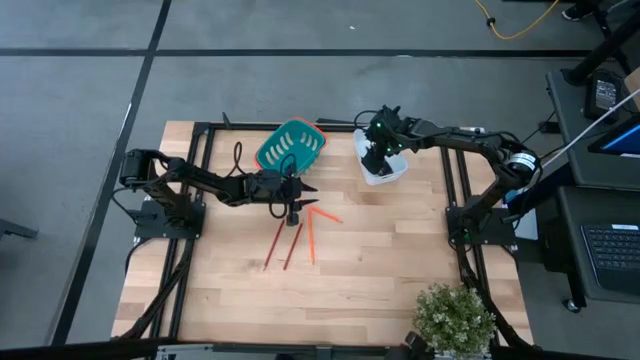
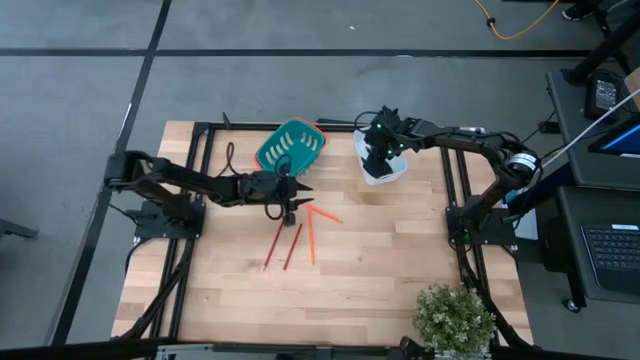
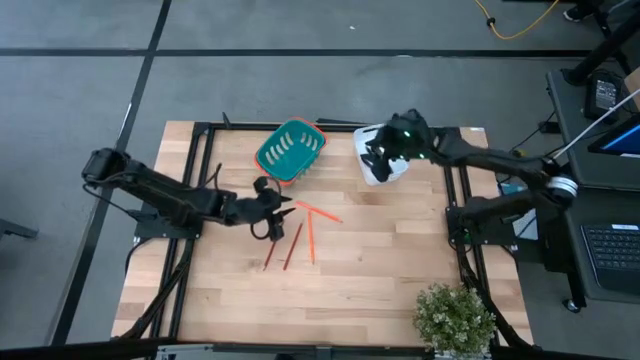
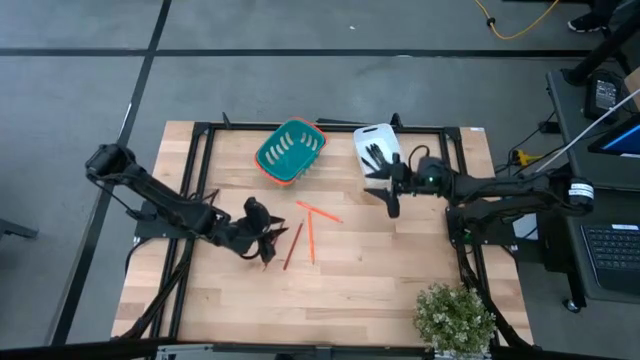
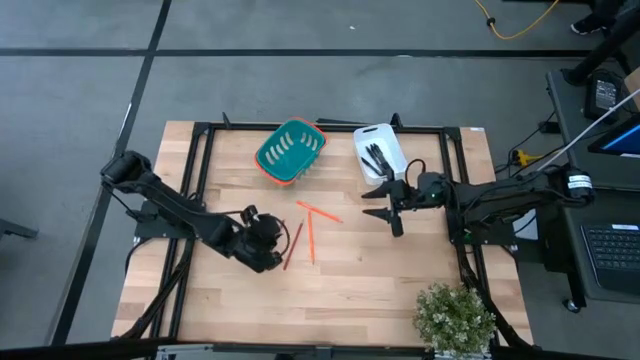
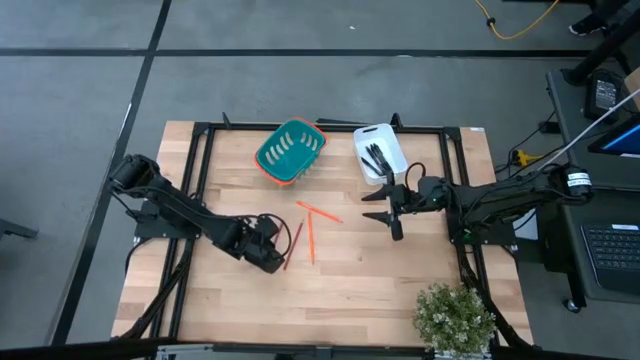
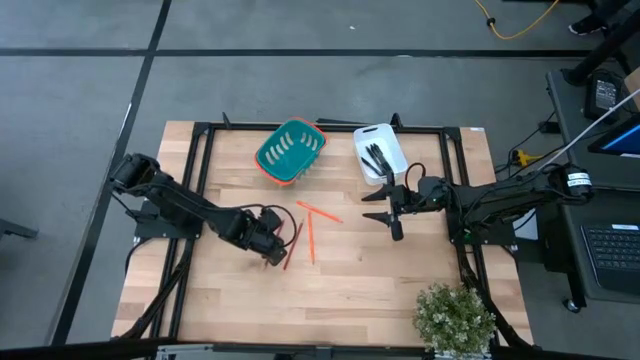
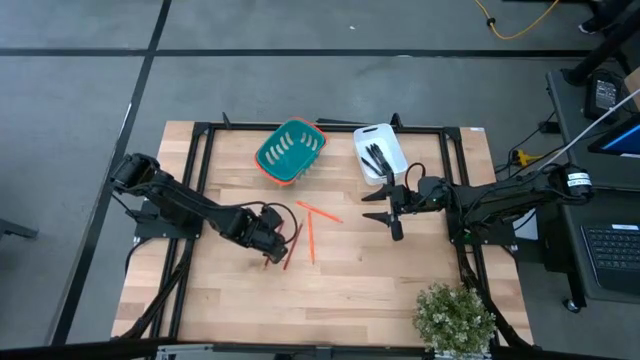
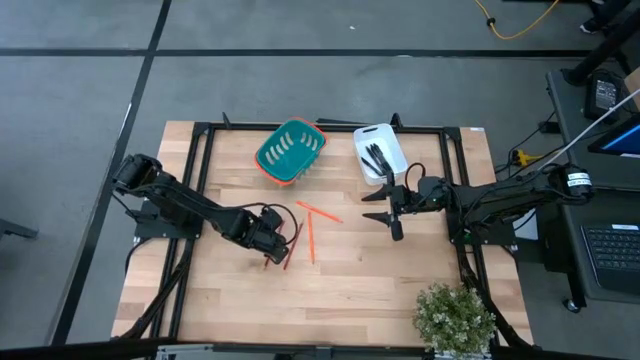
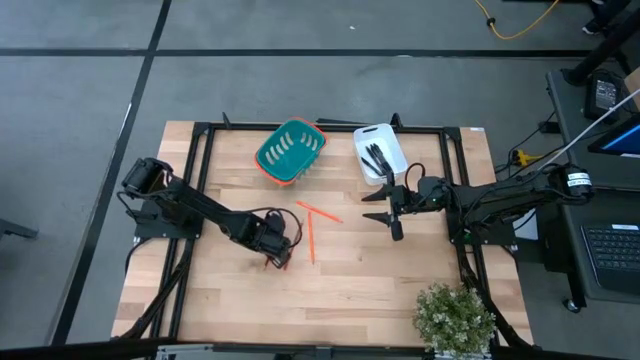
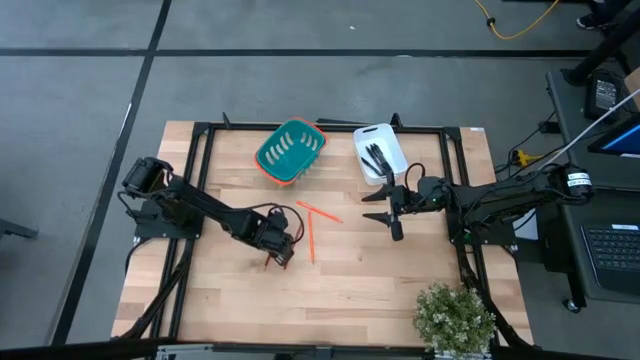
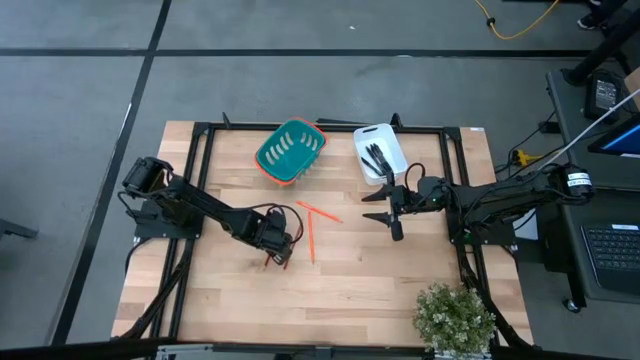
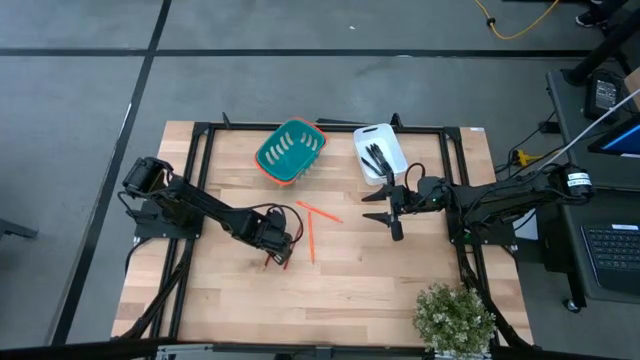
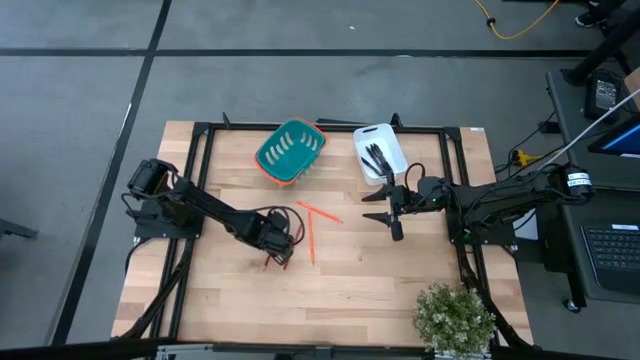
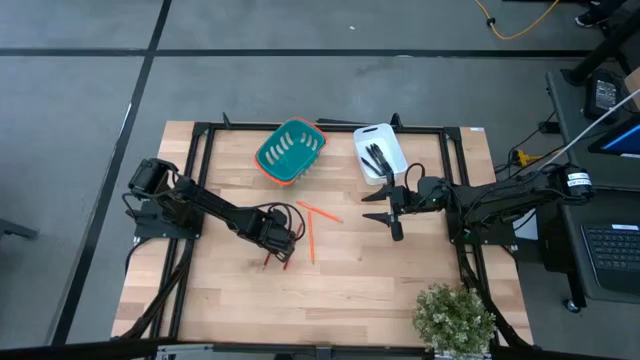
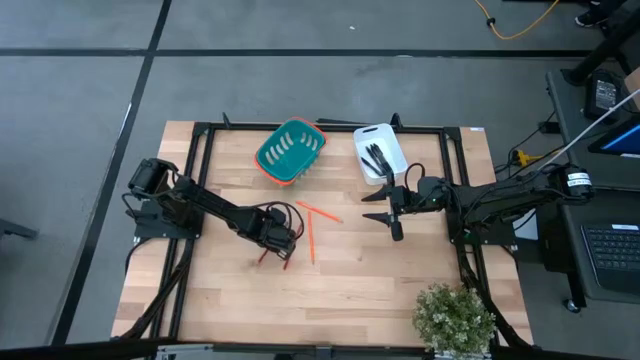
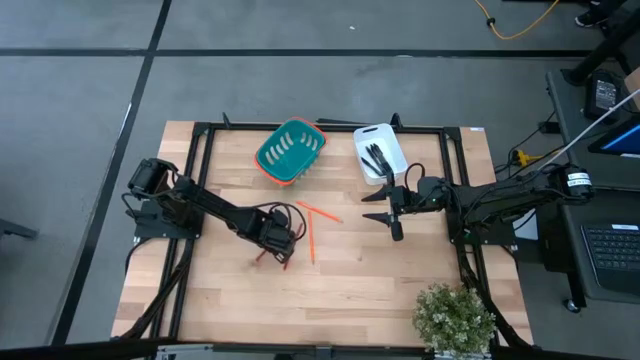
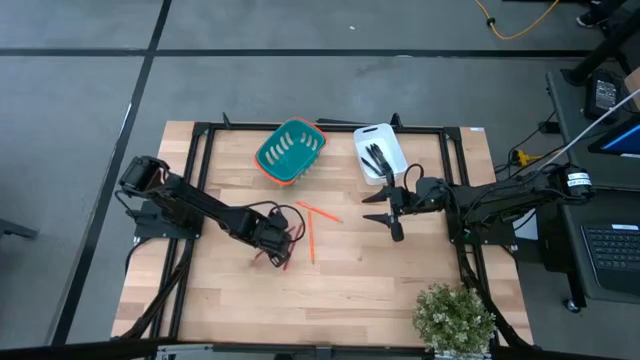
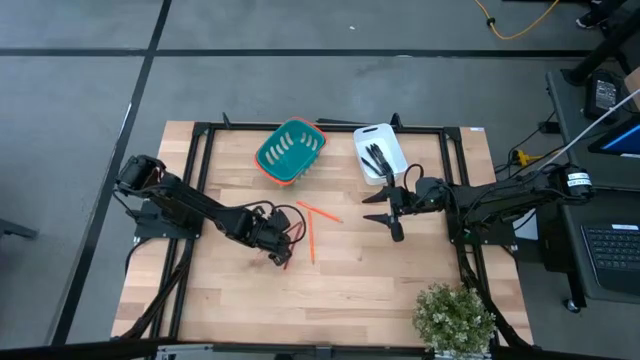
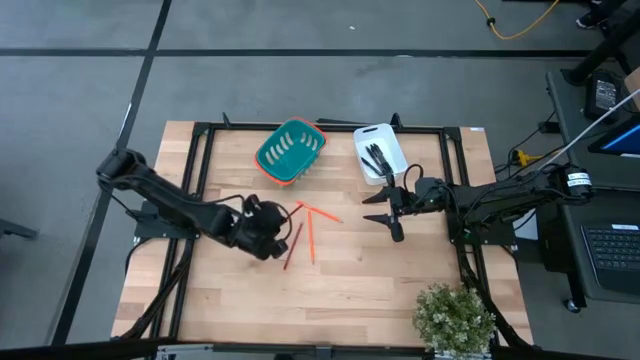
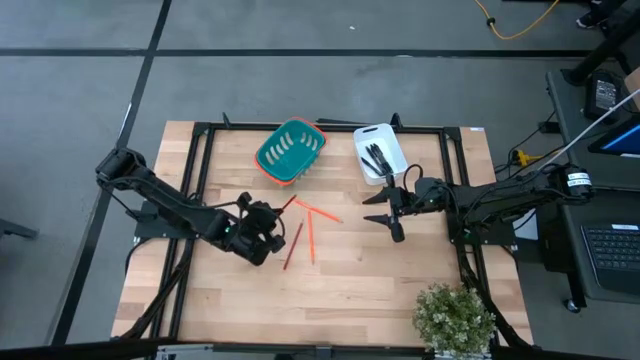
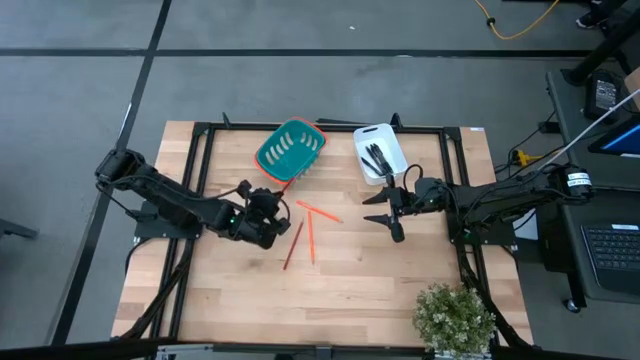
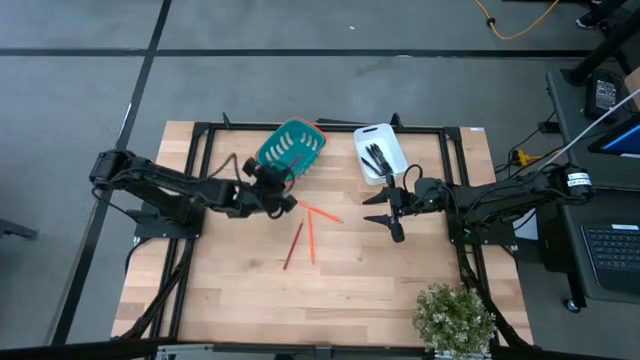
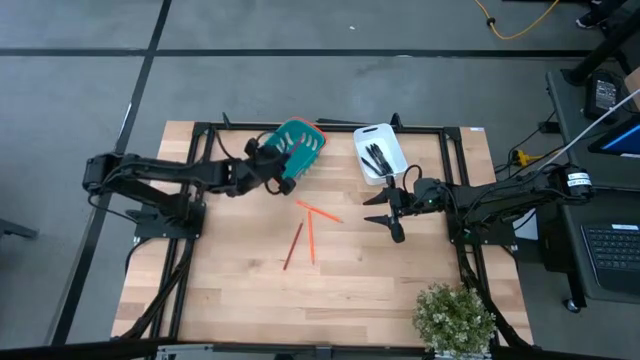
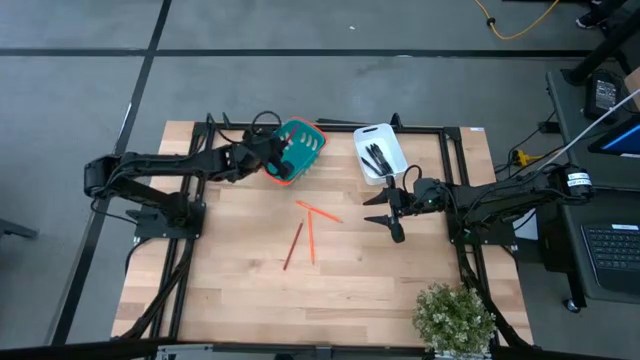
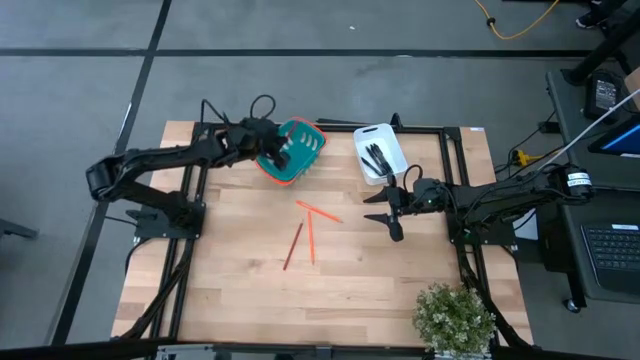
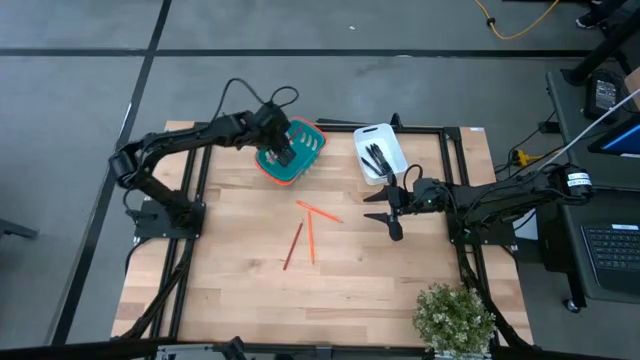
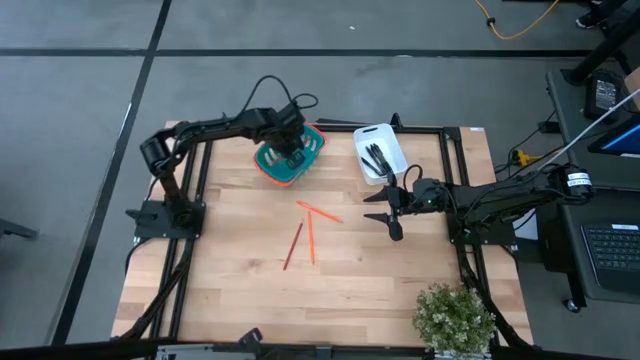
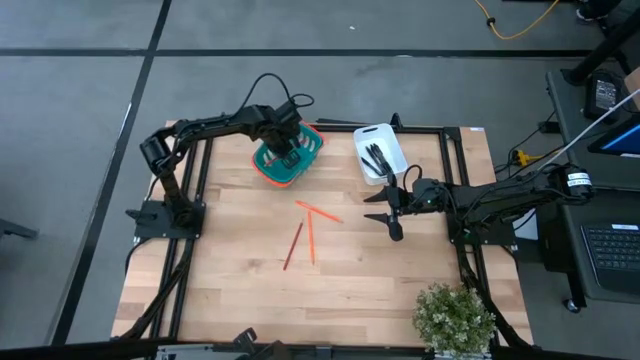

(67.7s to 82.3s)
Task: Sort pens & pencils
Put the red pencil into the blue bin

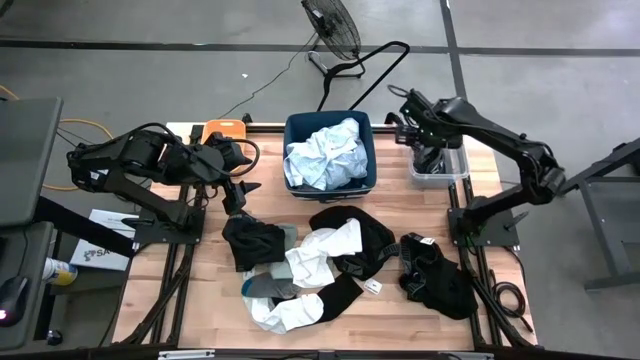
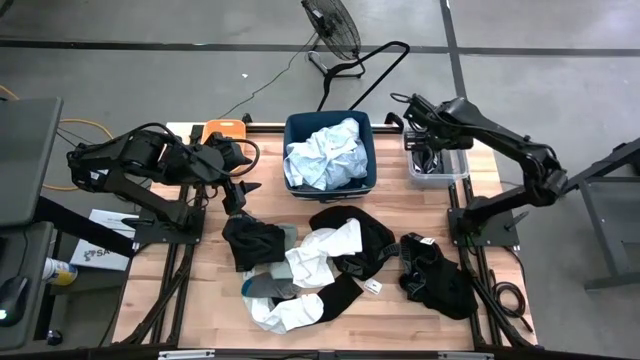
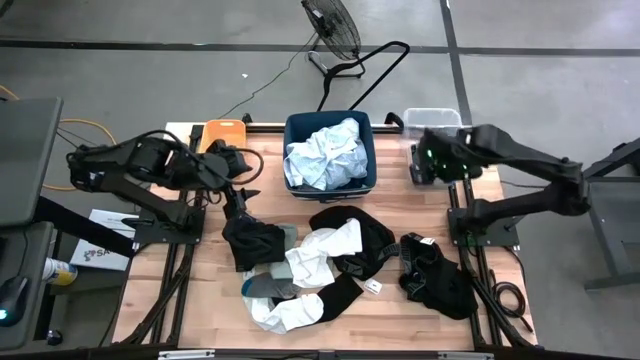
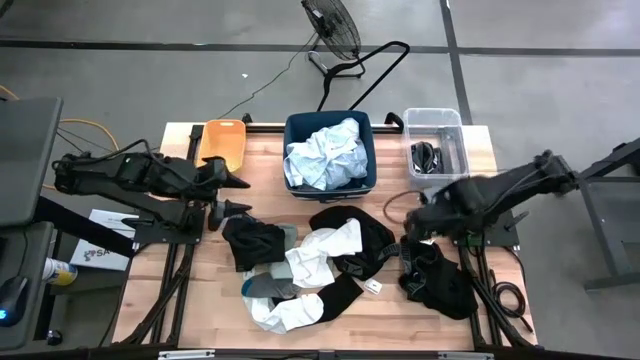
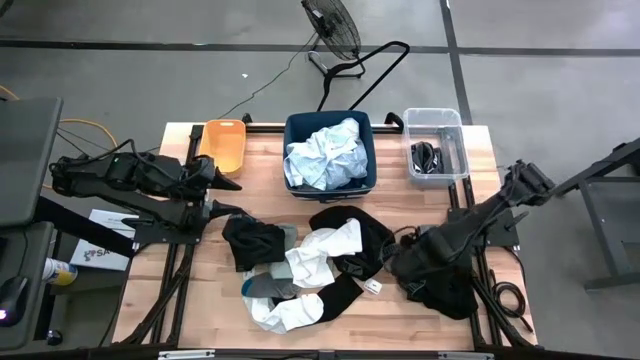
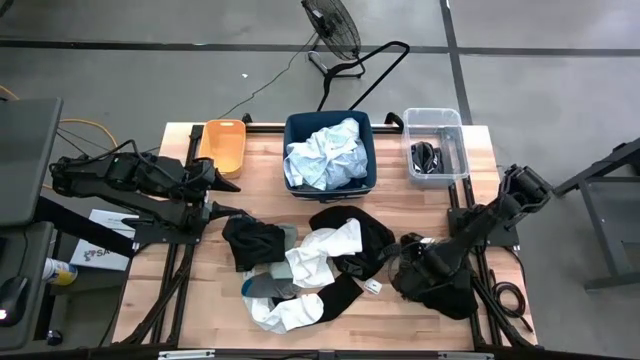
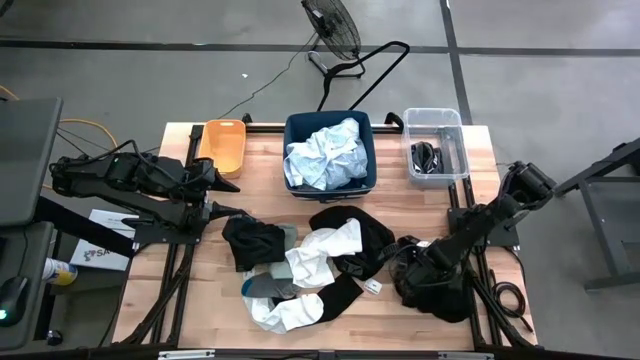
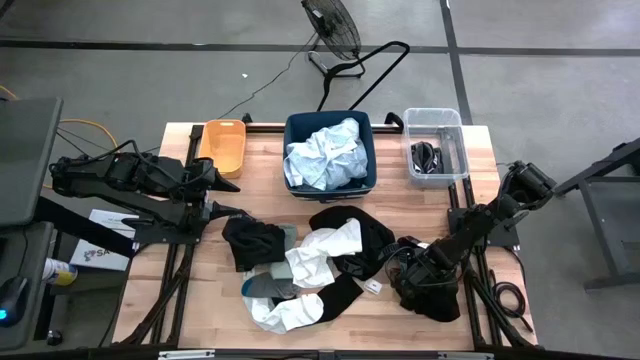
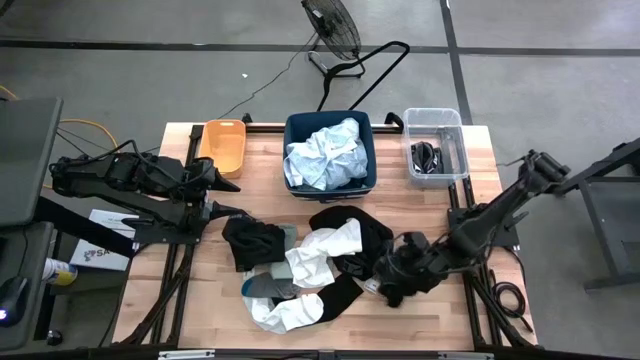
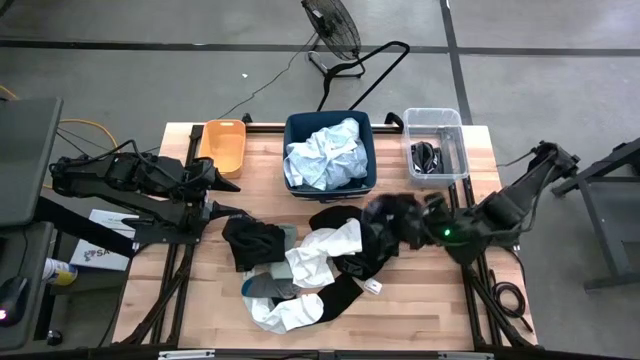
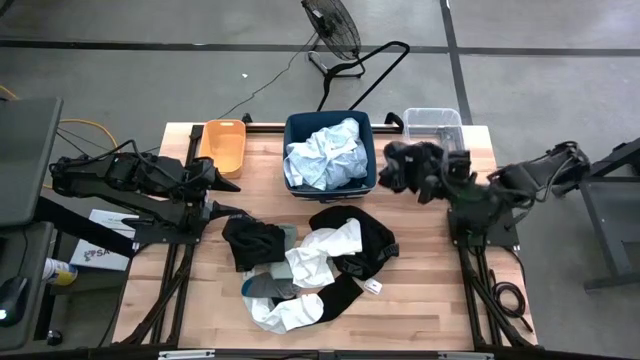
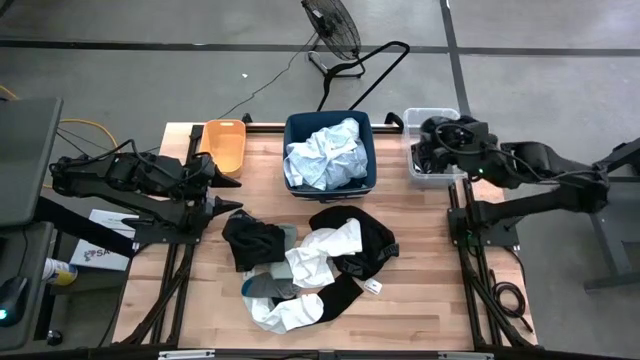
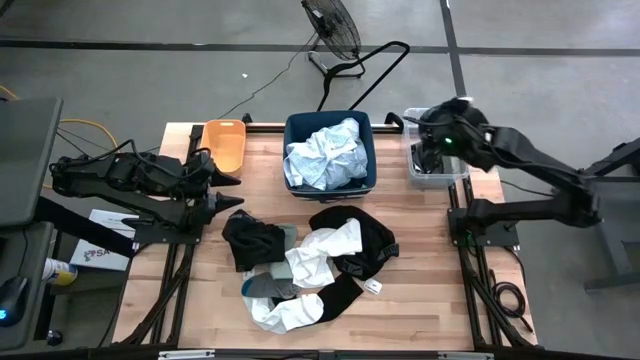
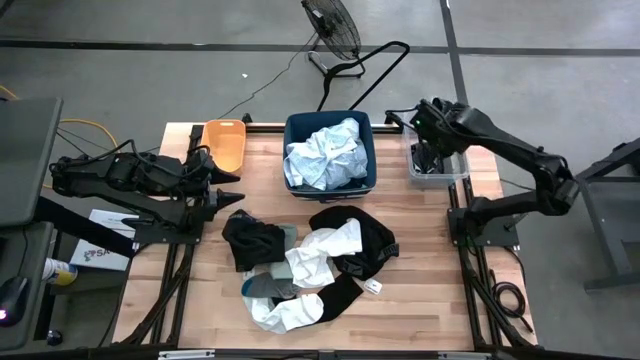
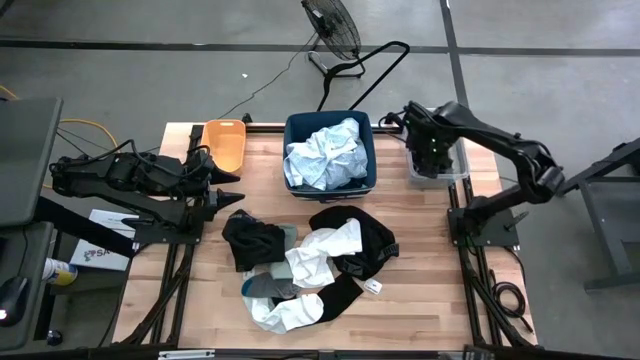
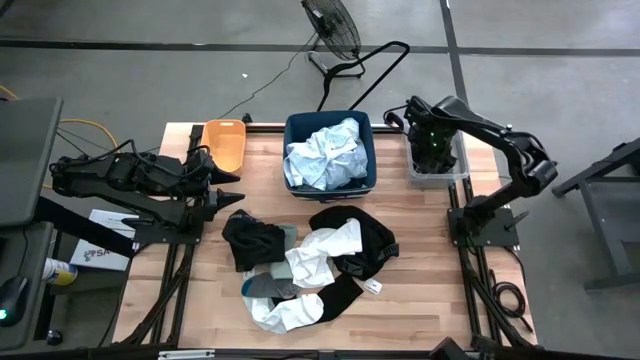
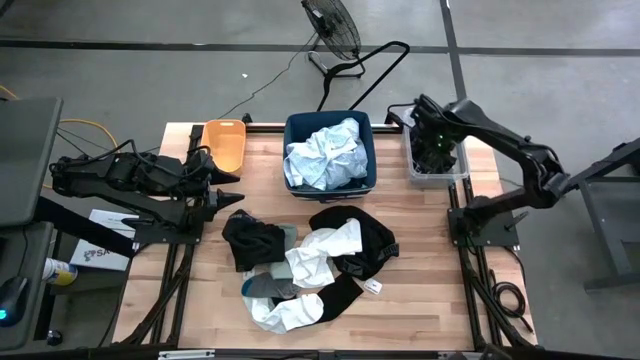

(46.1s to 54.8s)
Task: Pick & Place Cloths
Put the black boxers into the transparent bin
